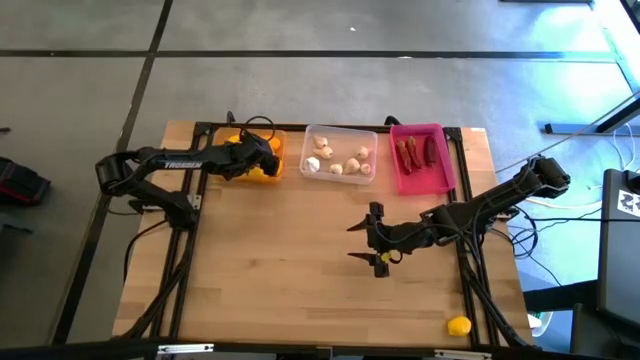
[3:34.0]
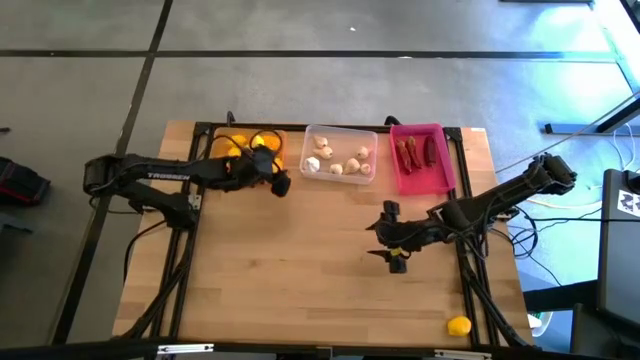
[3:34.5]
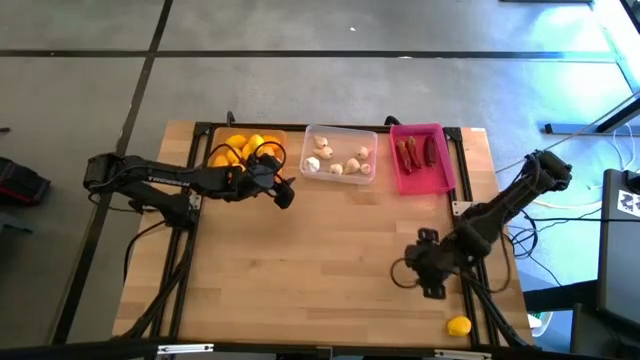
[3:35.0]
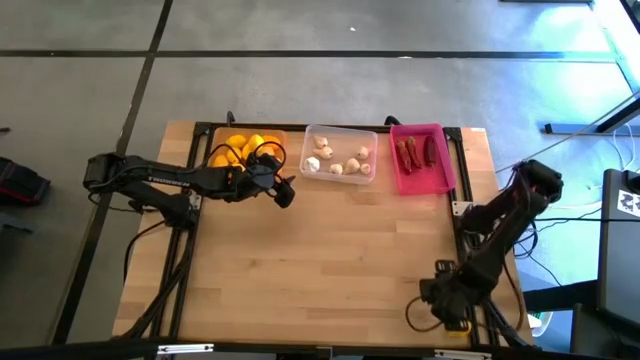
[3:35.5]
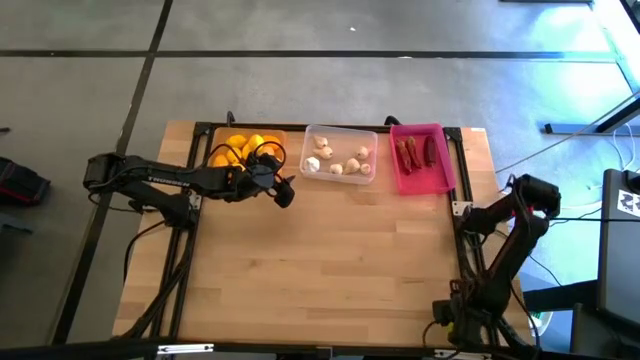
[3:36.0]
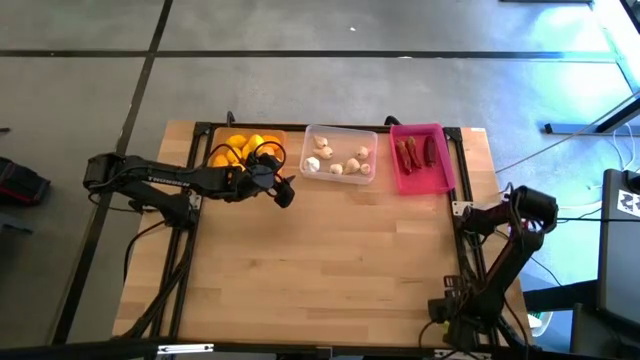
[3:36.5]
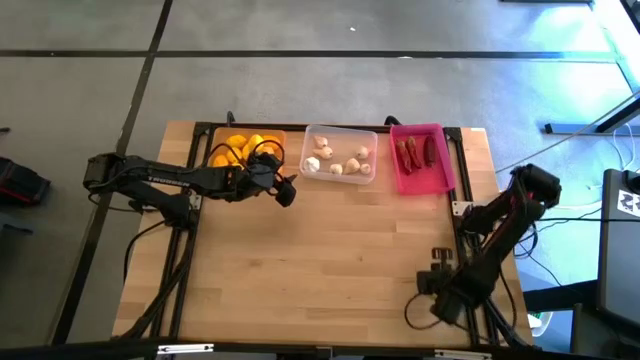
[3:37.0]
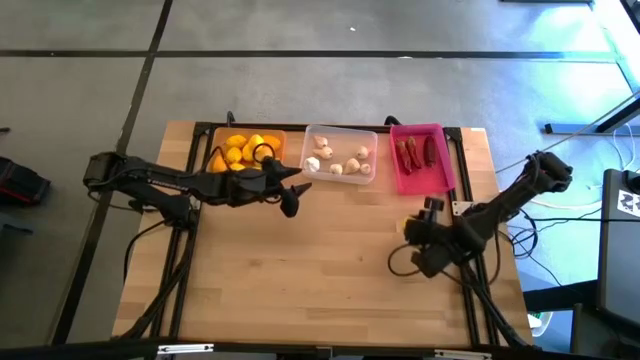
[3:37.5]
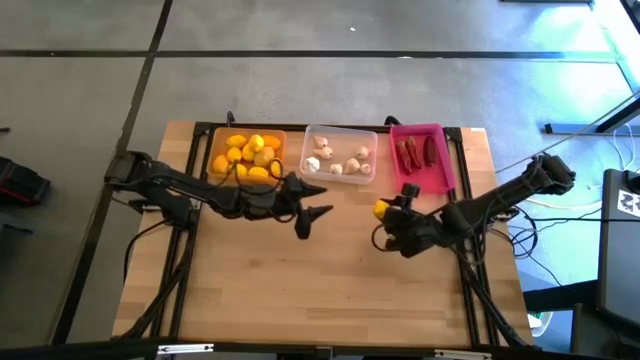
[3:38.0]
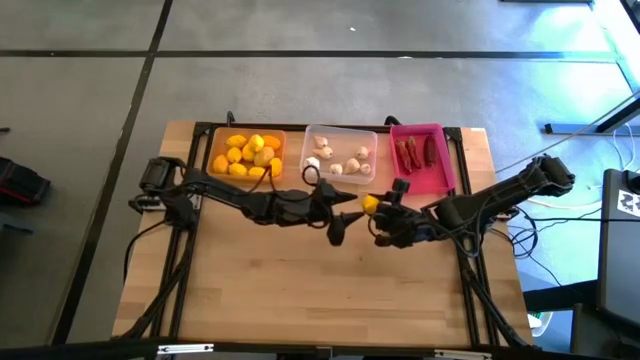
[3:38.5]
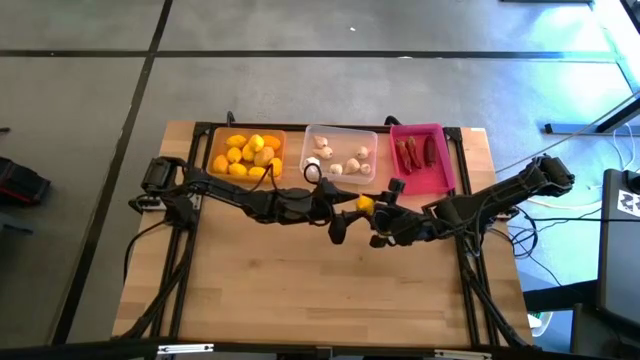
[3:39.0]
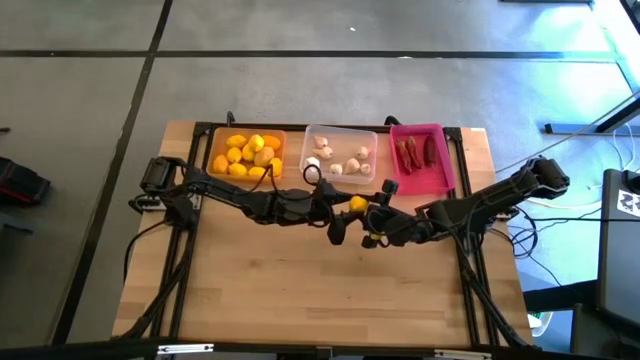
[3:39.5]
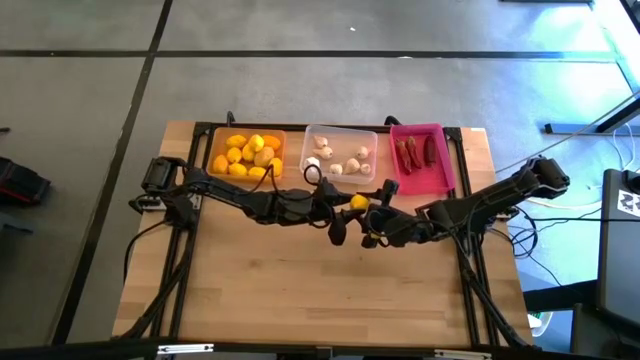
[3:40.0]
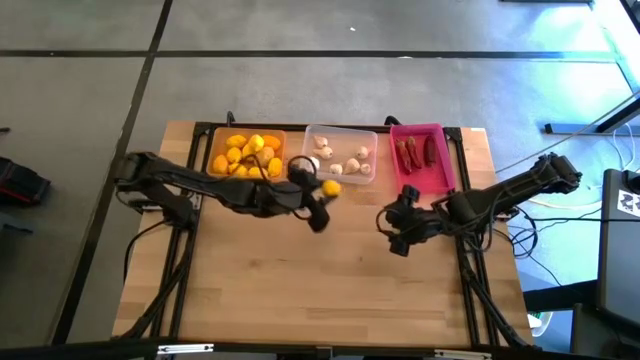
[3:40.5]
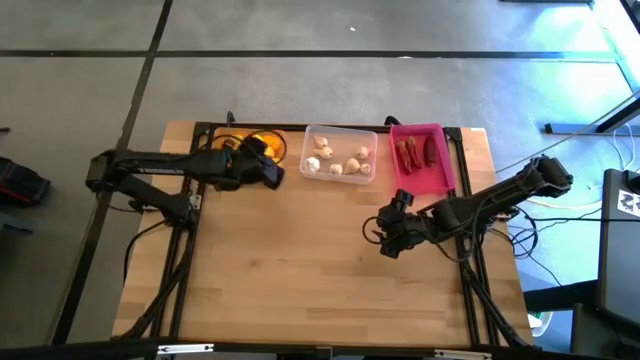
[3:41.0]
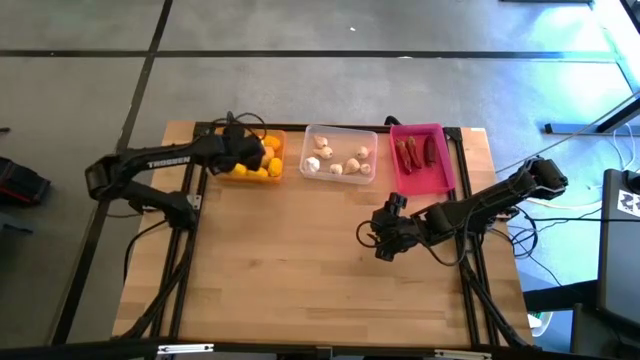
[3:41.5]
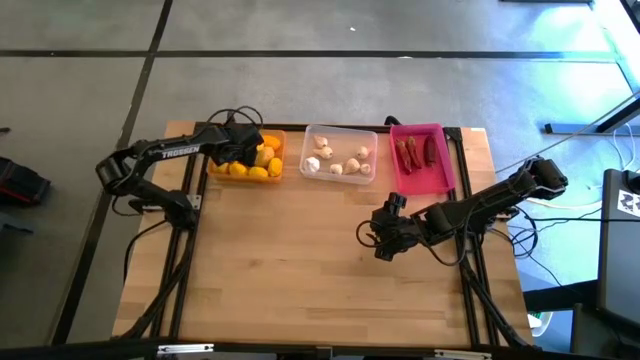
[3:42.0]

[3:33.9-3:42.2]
Task: Sort produce into baskets
Put the yellow lemon into the orange bin

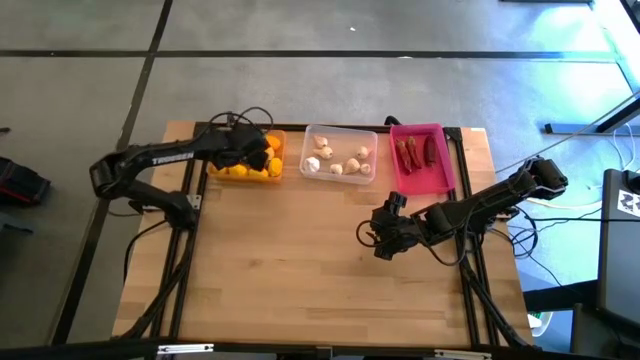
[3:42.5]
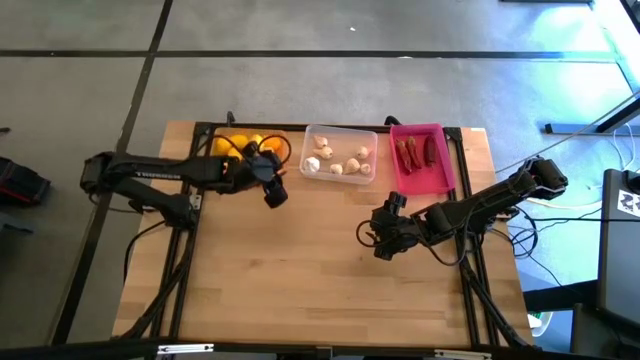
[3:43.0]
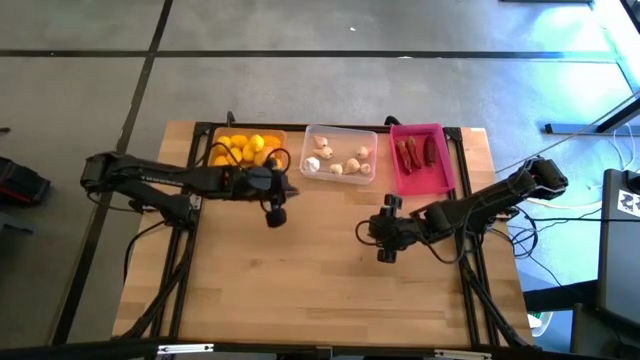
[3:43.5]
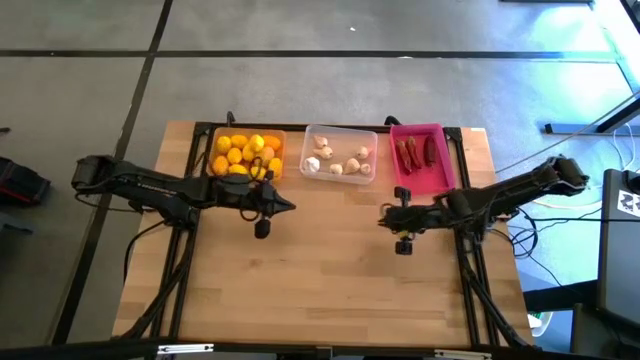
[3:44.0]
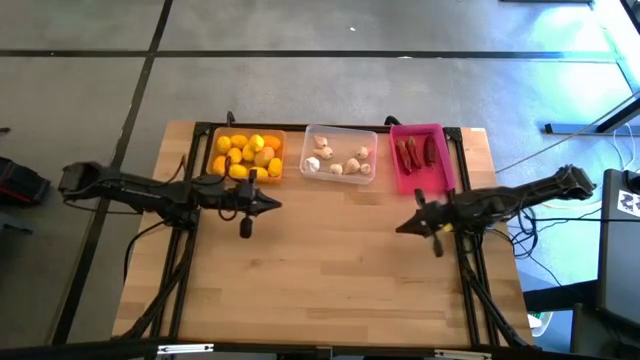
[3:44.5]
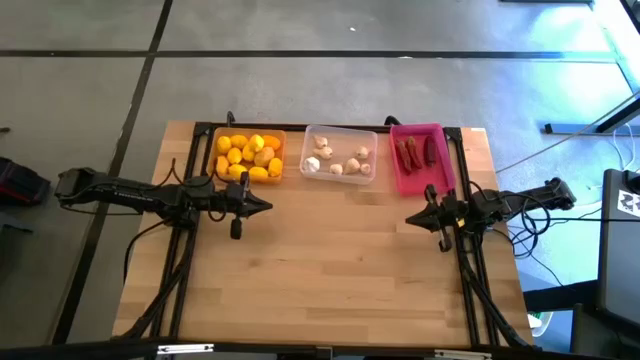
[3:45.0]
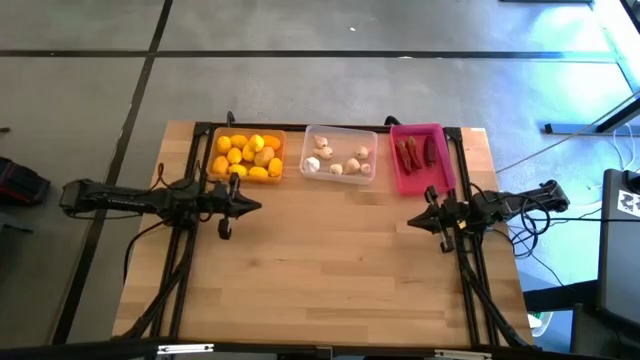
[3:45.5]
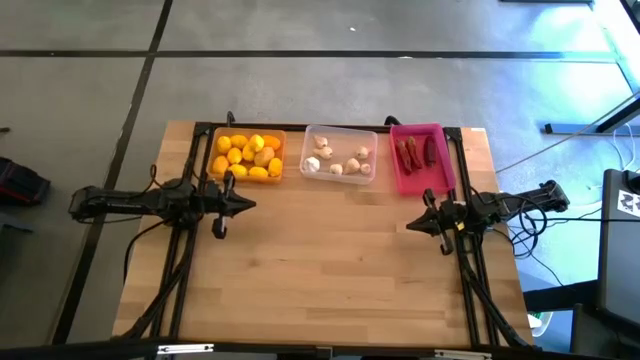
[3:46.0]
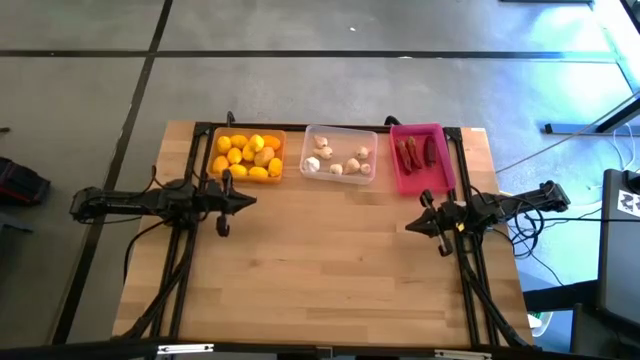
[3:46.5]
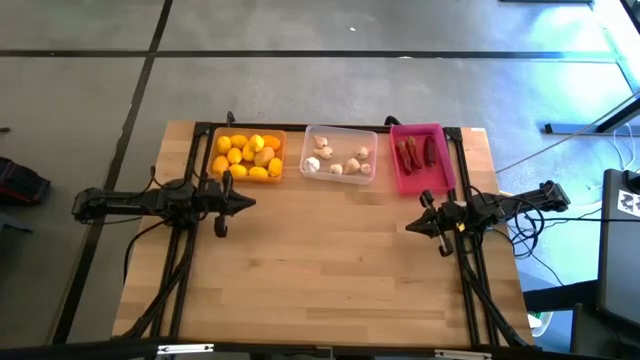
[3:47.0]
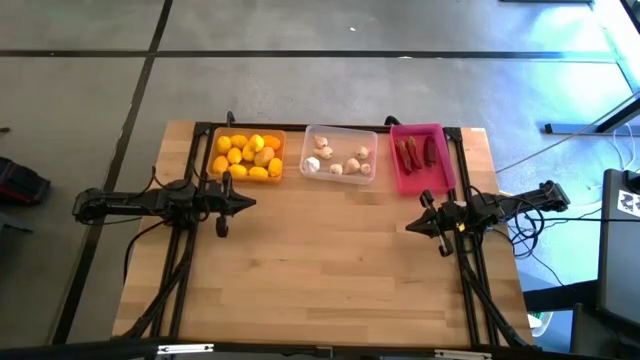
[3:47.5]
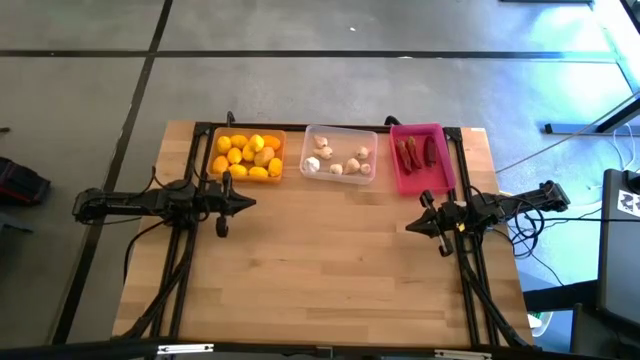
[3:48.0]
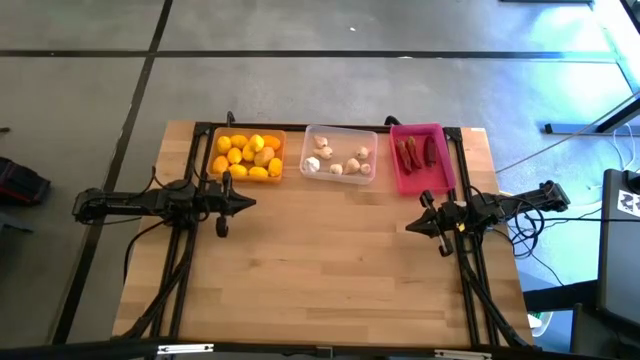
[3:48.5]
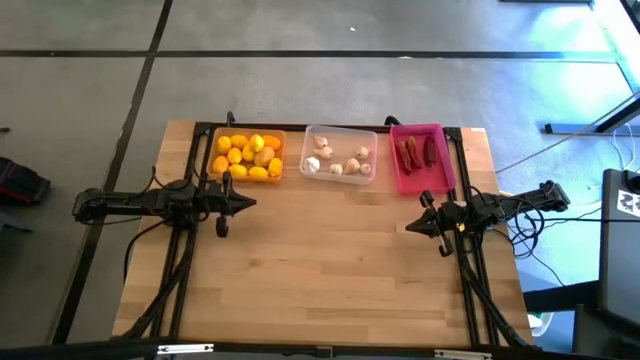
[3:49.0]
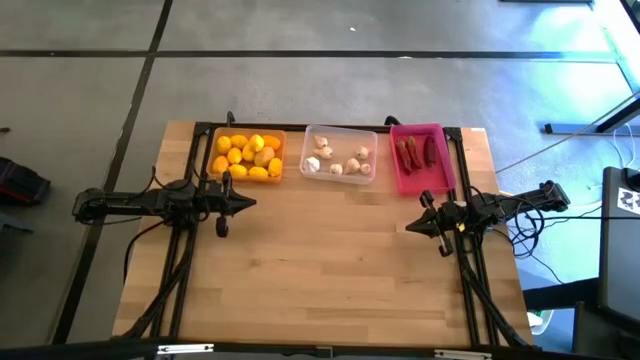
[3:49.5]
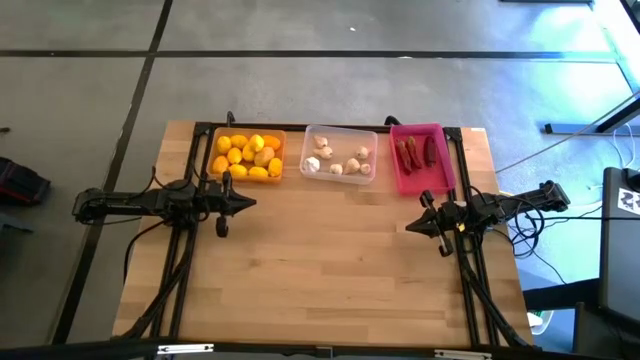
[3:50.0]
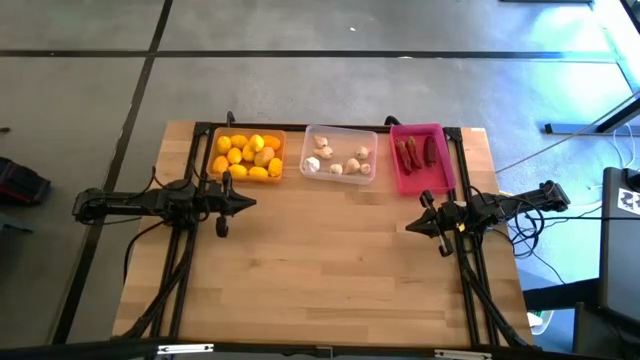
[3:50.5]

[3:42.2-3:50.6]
Return to Home Position

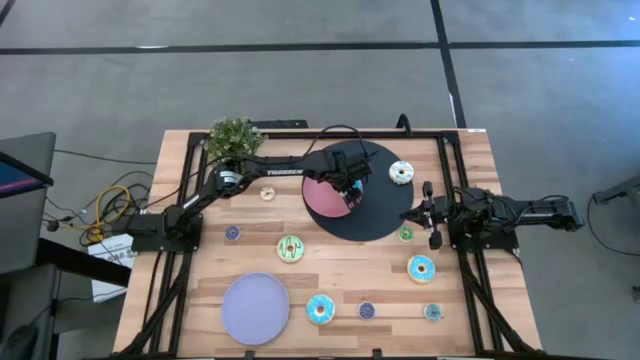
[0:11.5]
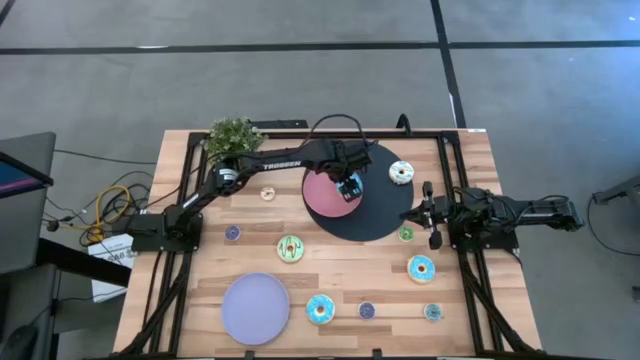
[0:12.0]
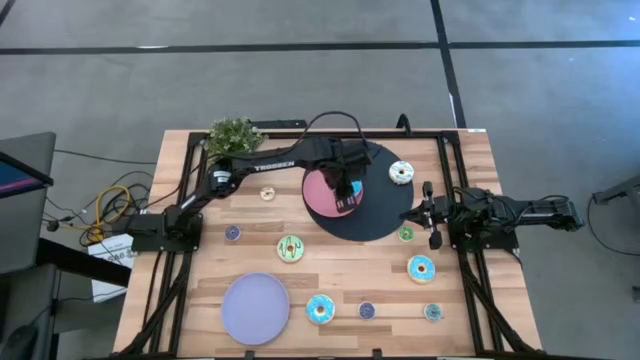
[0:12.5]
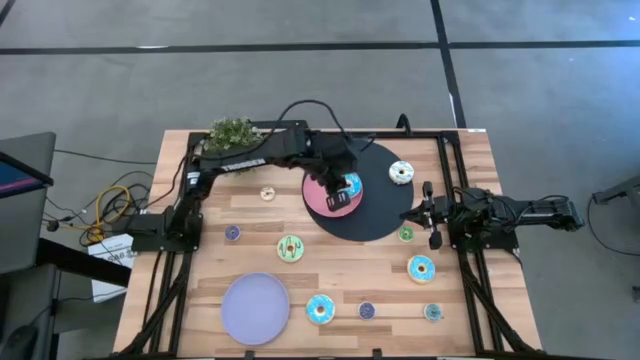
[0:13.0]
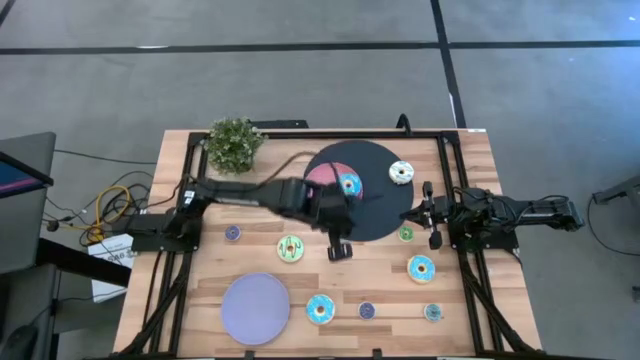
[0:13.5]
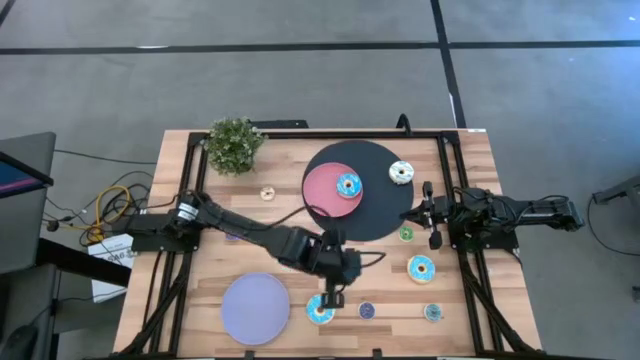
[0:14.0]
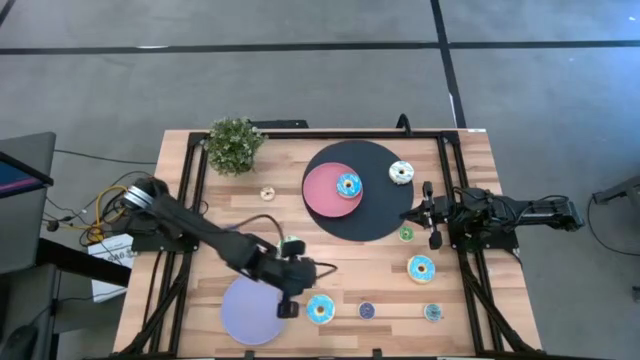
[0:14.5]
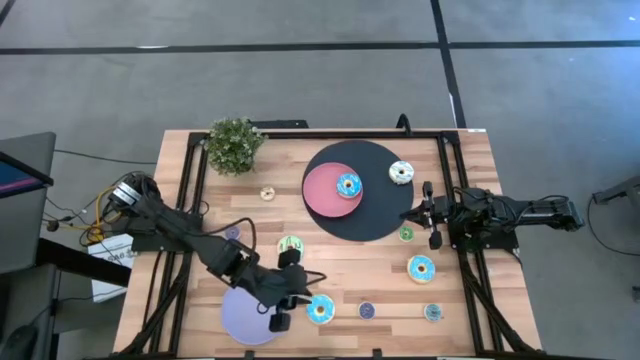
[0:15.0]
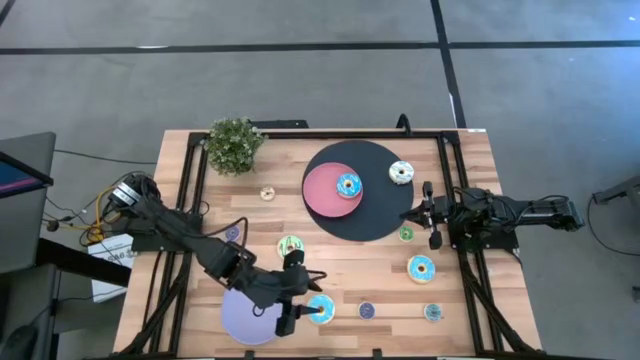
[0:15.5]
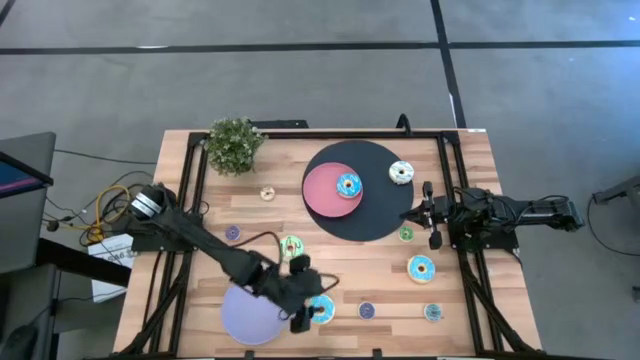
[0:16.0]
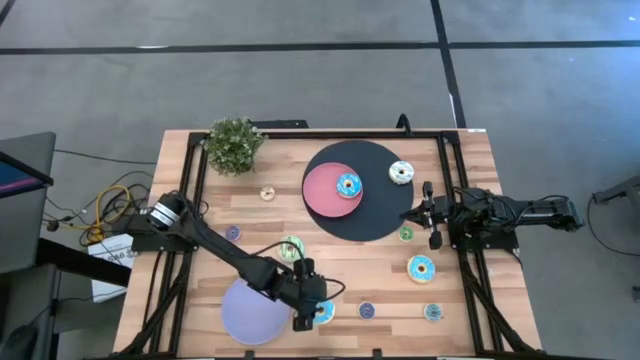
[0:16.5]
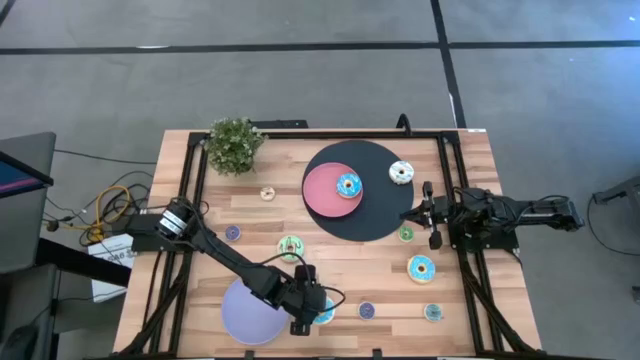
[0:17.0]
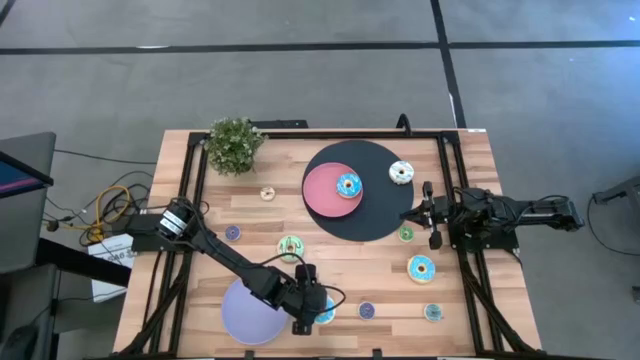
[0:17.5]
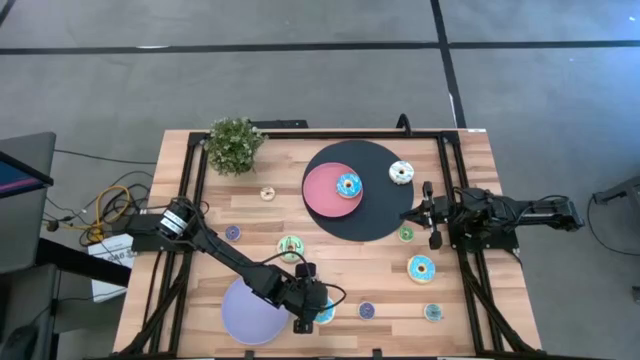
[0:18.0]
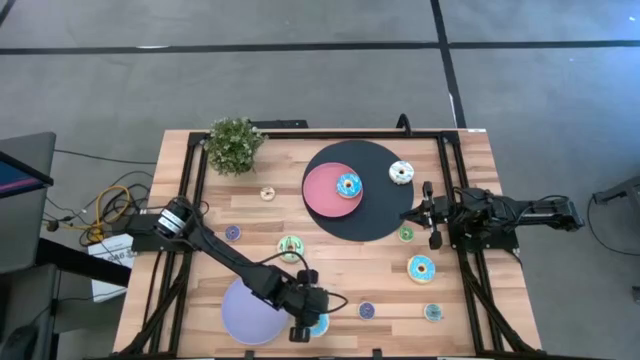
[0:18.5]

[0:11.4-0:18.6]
Task: Pick & Place donuts
Put the big blue donut on the pink plate
